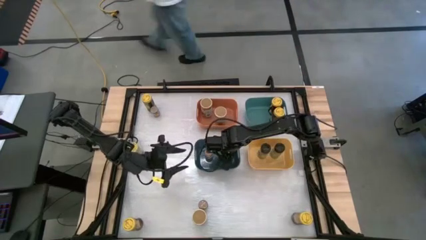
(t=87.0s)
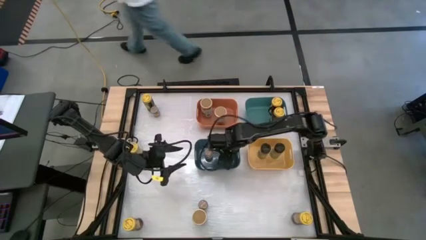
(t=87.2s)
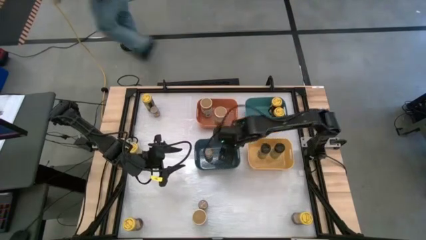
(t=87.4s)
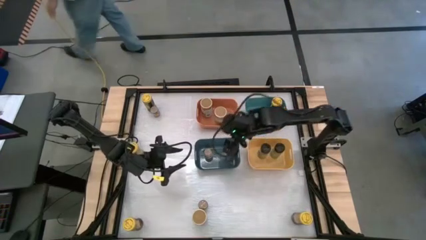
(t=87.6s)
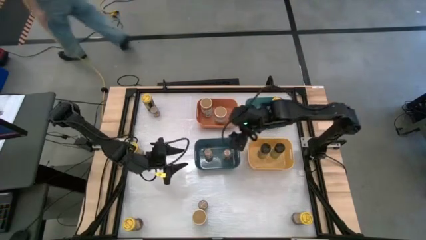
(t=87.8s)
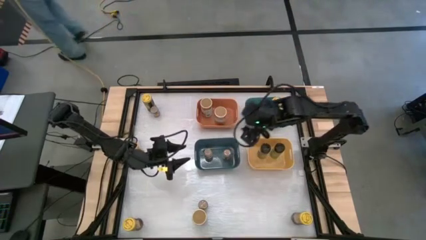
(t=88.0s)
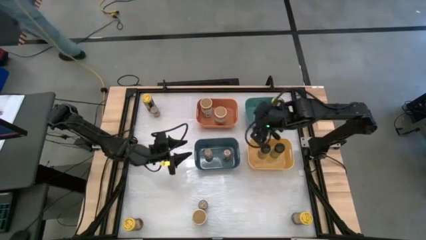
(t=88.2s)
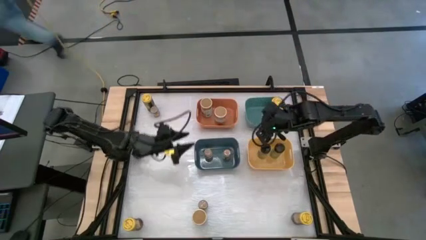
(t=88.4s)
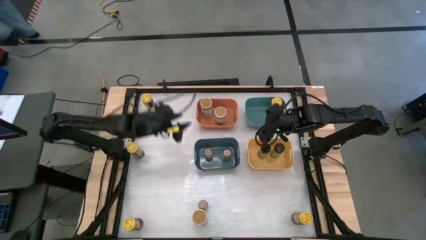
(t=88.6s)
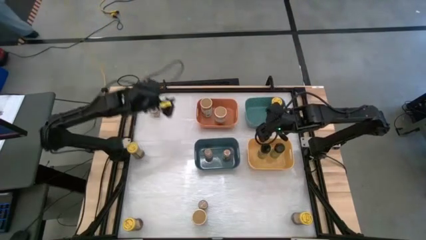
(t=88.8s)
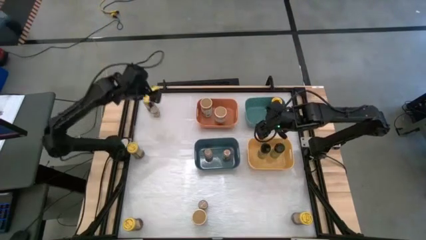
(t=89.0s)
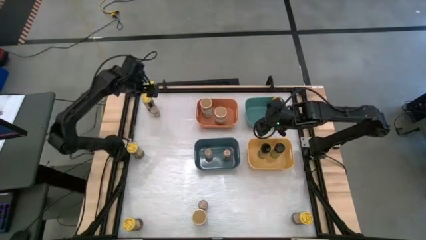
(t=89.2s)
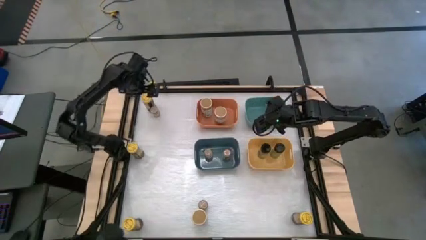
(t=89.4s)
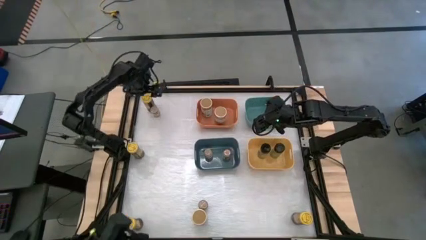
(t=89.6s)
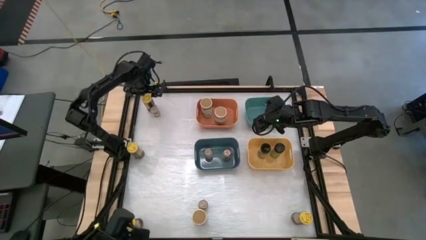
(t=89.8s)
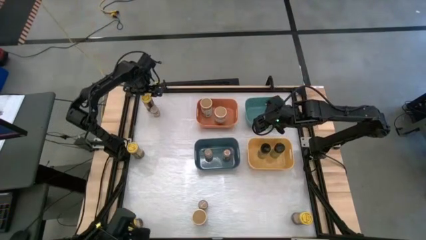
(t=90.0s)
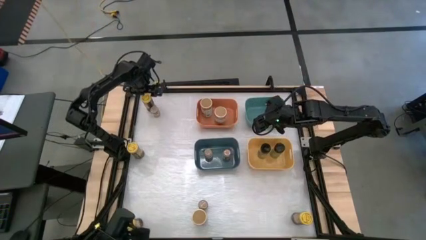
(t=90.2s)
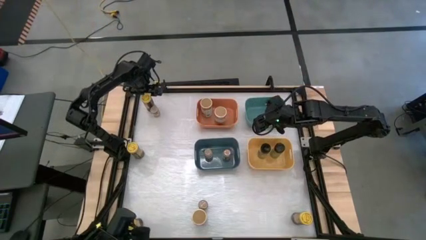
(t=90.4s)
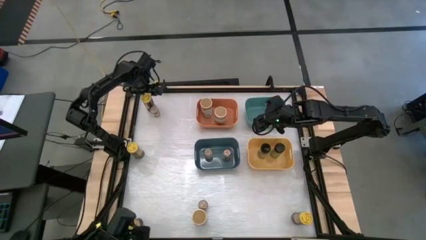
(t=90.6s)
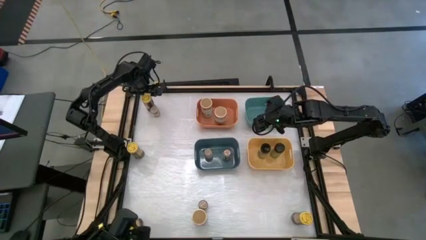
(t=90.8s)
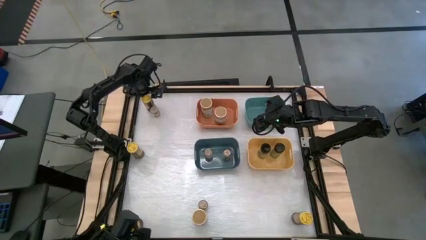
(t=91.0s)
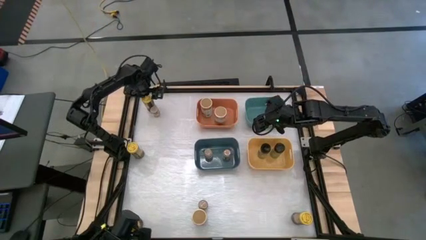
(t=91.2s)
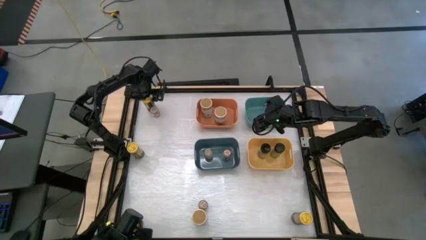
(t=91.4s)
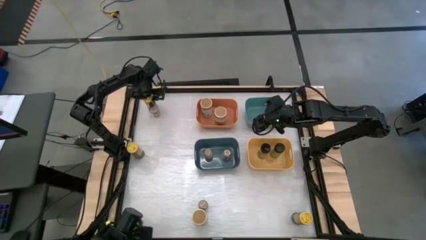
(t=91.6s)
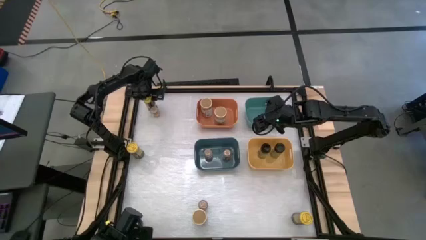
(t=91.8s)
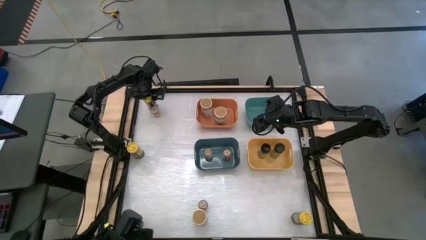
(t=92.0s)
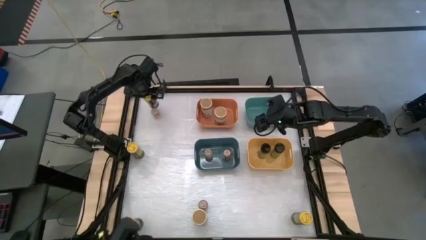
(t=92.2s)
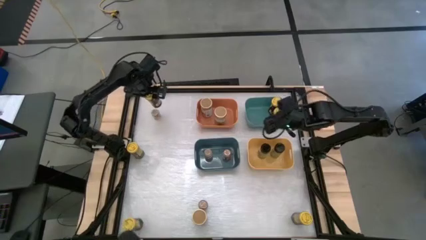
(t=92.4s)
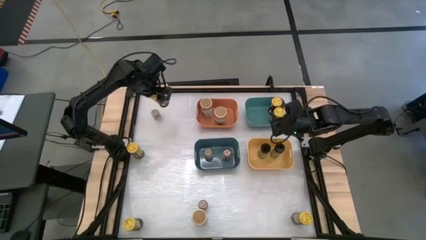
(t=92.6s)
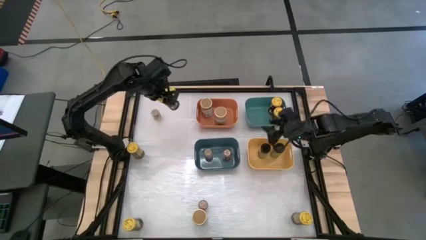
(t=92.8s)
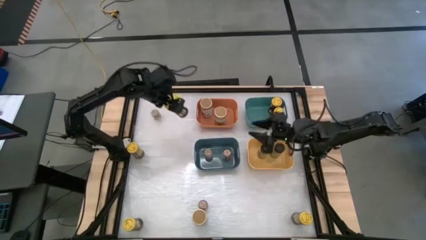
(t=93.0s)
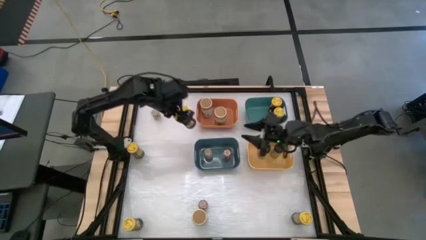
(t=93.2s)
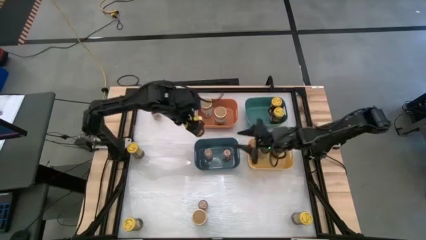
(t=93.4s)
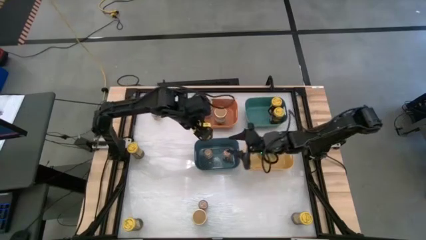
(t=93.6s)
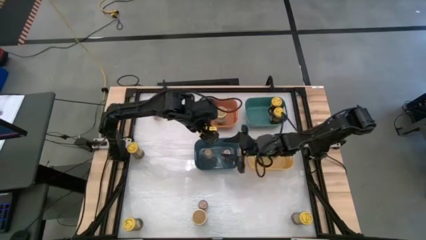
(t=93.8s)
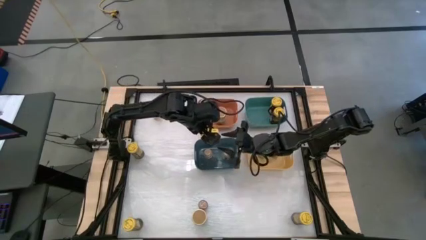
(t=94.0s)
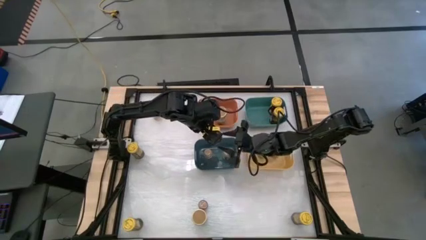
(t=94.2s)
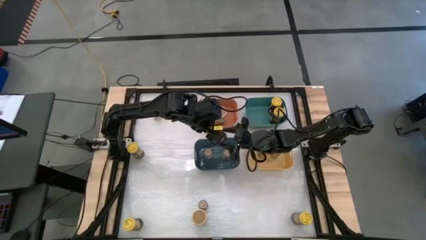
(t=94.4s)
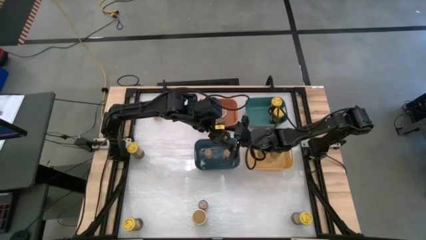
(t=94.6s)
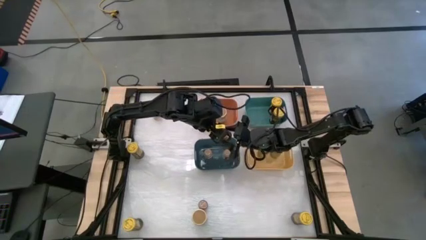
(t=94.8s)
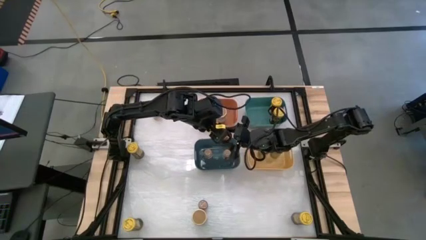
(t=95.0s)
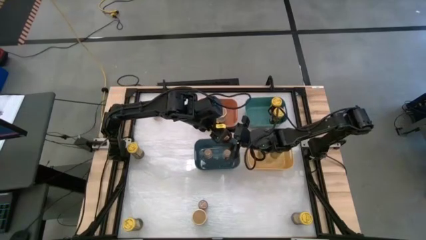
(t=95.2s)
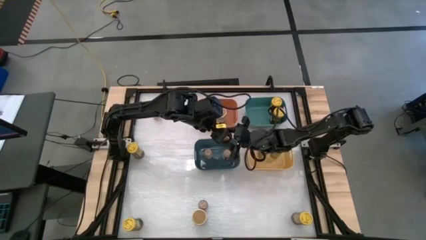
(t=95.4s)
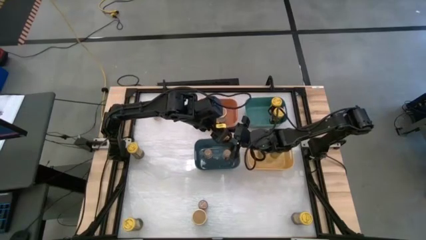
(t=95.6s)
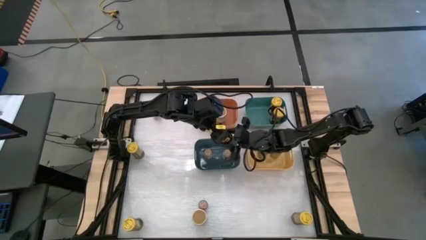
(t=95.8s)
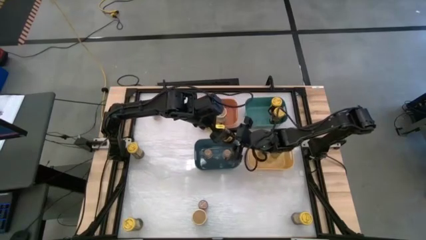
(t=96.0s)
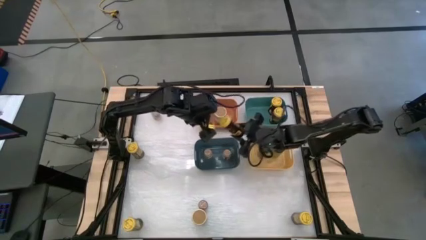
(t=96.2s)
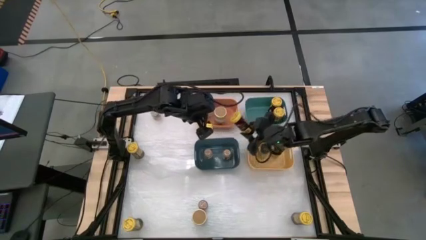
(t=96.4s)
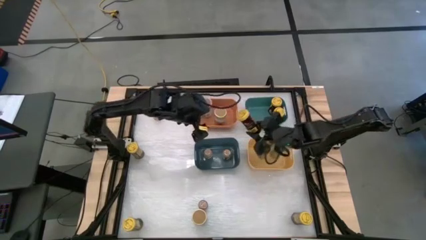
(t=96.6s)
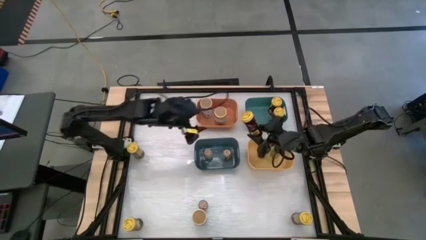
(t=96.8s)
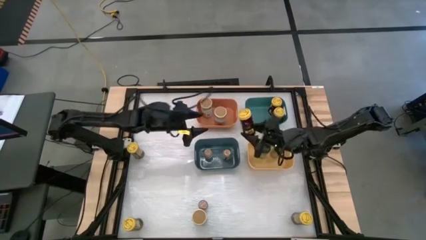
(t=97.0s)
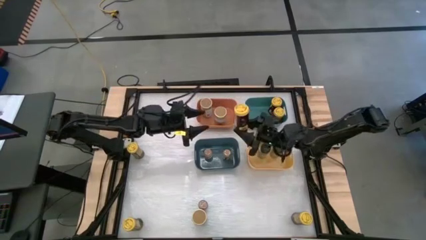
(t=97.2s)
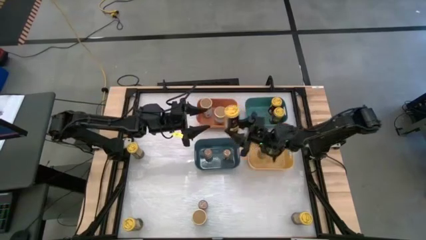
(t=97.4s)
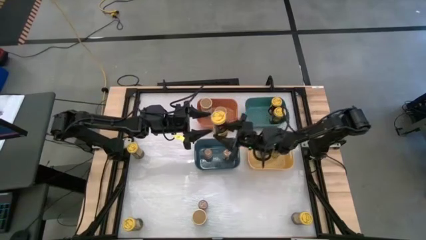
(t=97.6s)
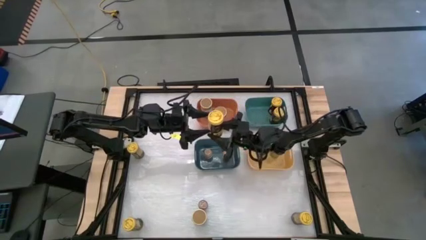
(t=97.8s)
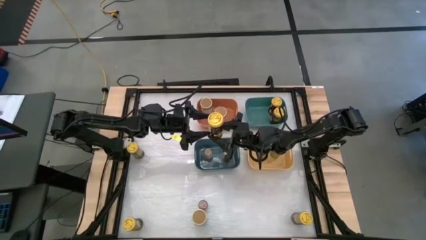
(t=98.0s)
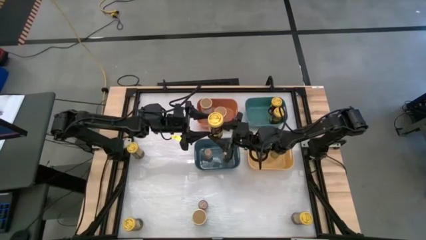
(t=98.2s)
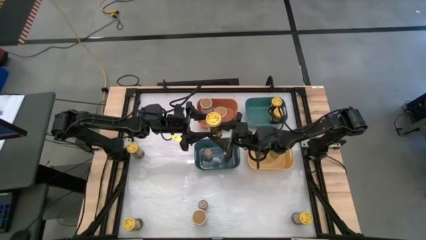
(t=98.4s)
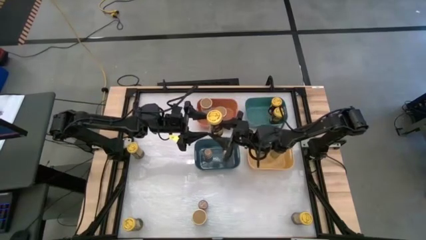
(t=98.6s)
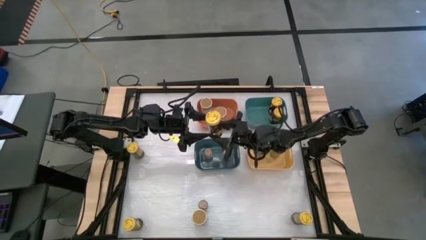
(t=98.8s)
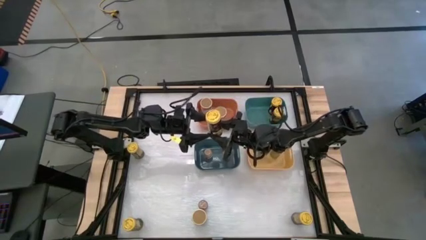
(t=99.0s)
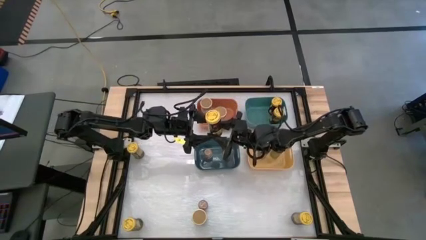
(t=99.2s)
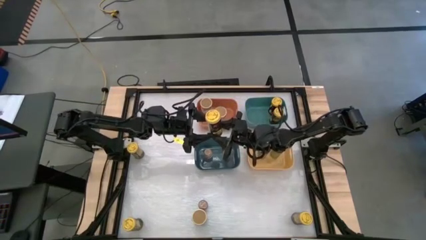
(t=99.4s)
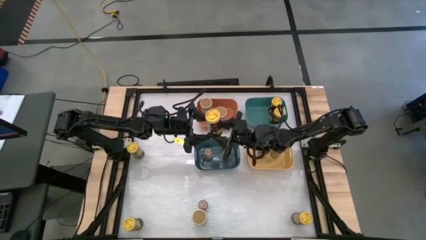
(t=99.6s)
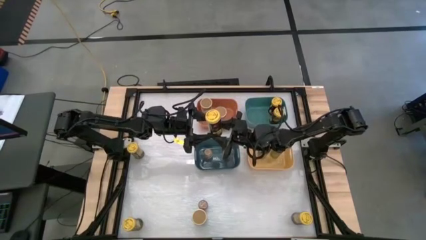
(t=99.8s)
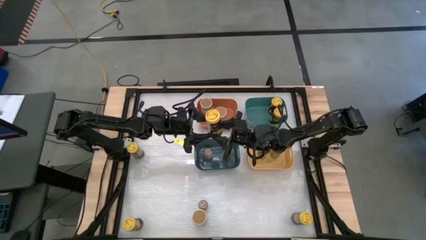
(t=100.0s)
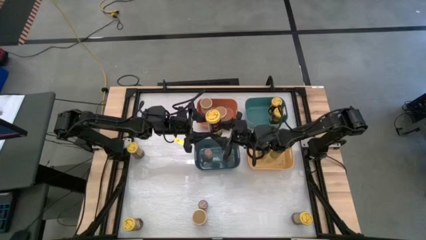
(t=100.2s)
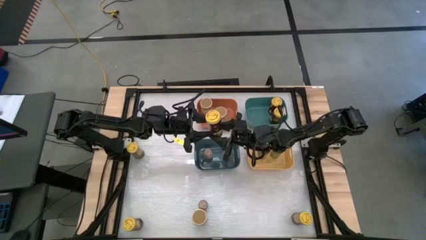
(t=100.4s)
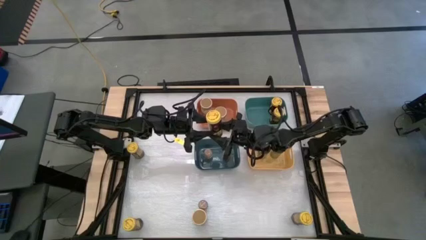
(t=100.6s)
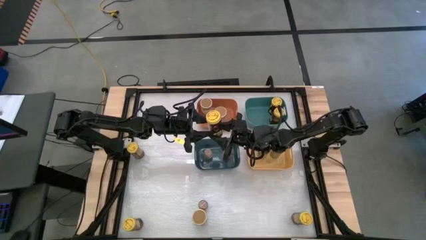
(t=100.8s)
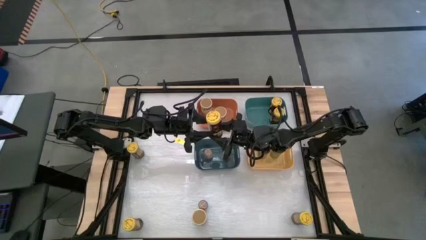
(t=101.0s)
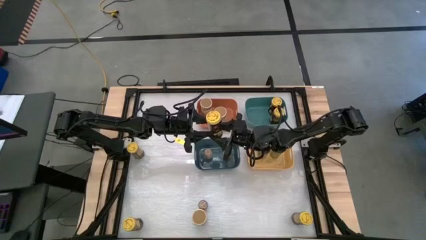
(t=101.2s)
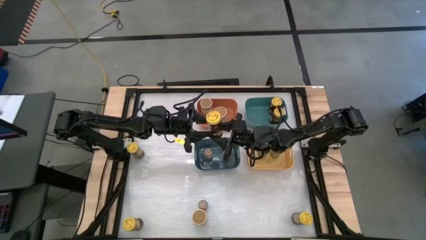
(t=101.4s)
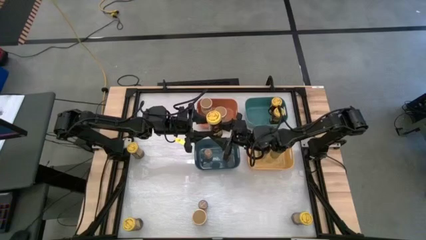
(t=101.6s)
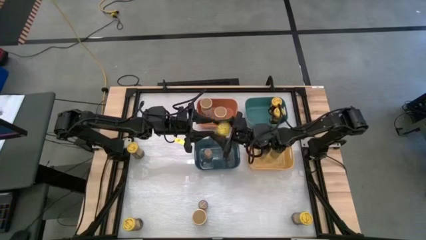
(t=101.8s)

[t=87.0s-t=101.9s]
Task: Sort spices by type
Put the yellow spice bottle into the green bin
